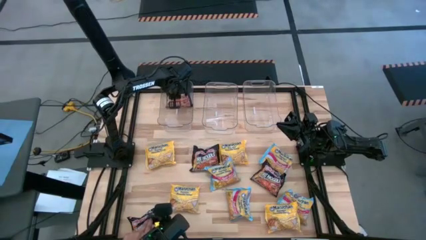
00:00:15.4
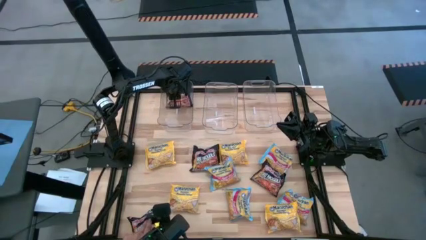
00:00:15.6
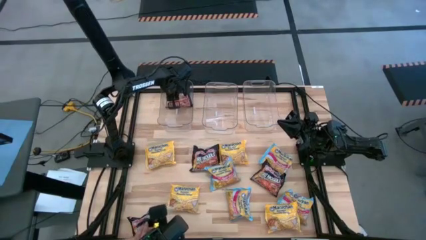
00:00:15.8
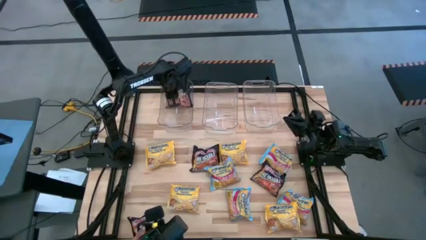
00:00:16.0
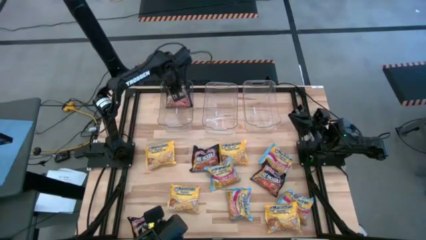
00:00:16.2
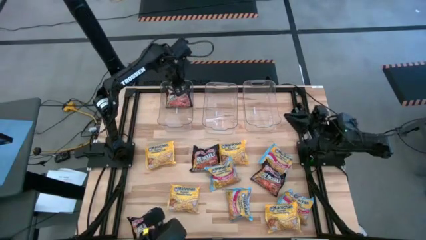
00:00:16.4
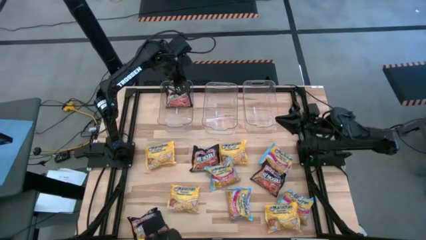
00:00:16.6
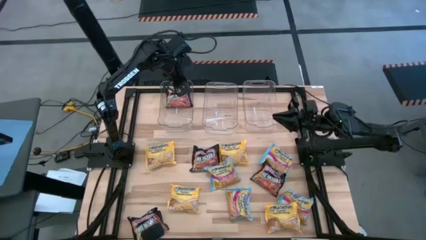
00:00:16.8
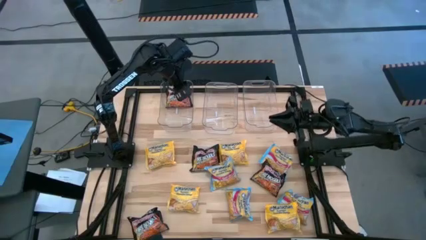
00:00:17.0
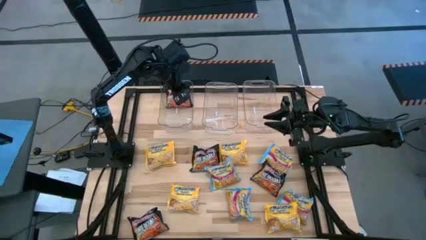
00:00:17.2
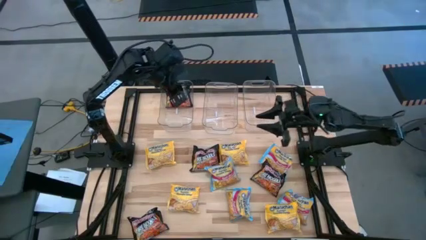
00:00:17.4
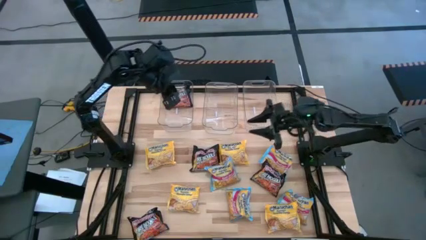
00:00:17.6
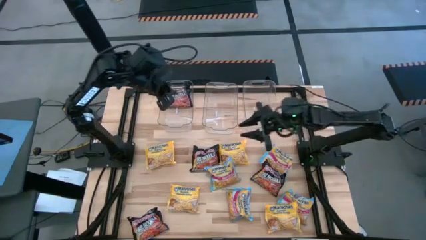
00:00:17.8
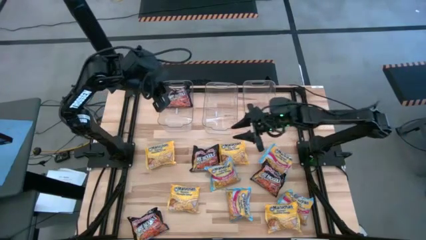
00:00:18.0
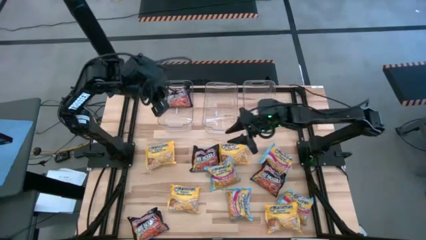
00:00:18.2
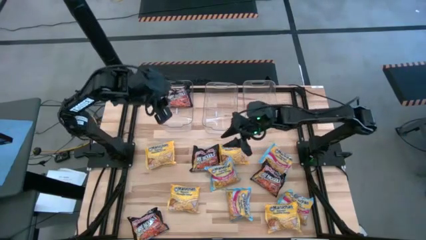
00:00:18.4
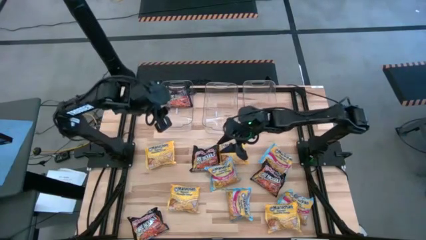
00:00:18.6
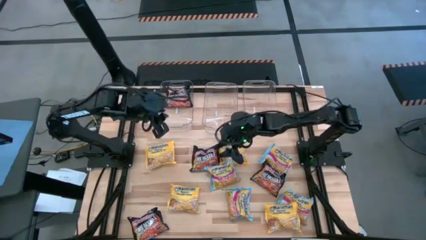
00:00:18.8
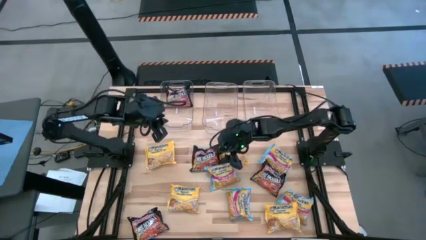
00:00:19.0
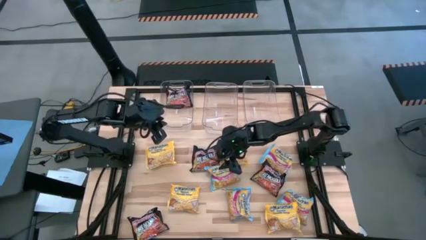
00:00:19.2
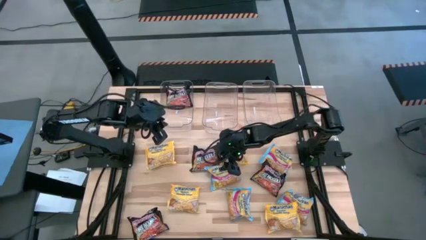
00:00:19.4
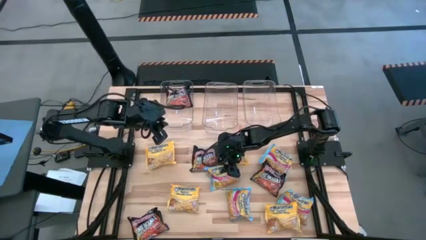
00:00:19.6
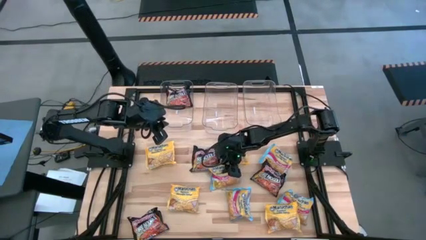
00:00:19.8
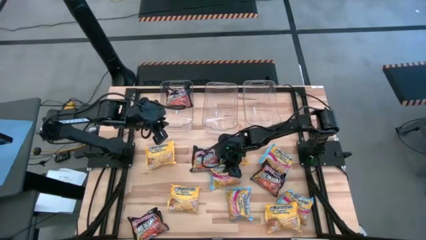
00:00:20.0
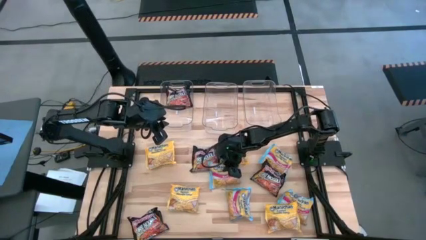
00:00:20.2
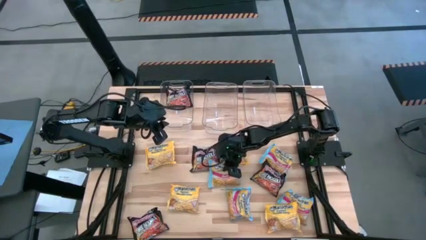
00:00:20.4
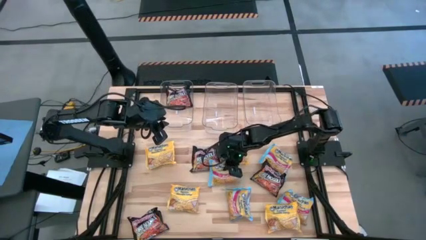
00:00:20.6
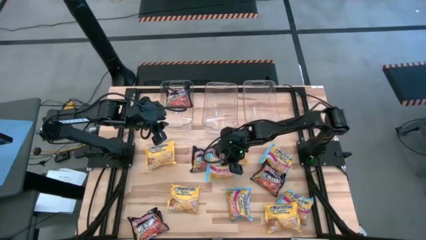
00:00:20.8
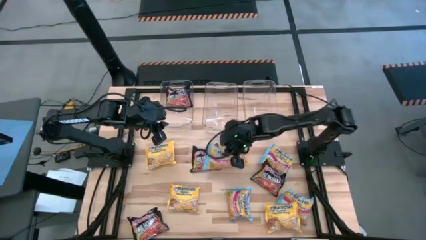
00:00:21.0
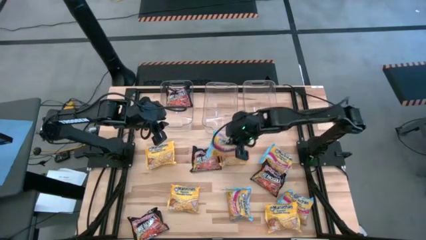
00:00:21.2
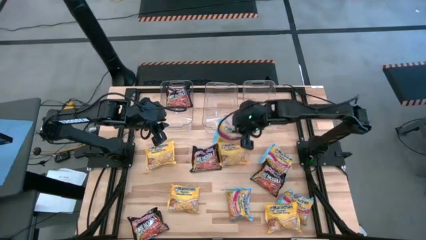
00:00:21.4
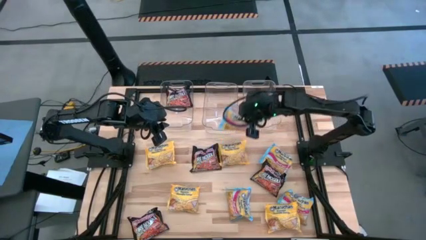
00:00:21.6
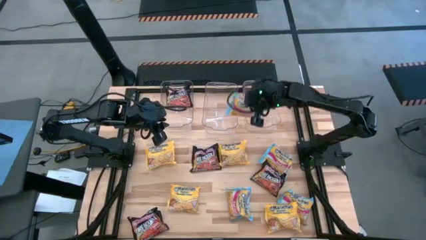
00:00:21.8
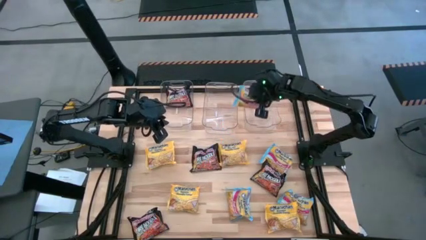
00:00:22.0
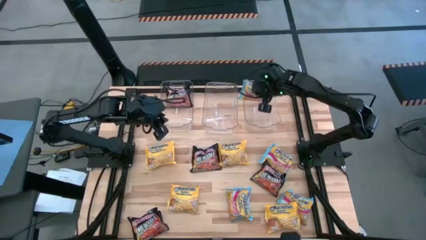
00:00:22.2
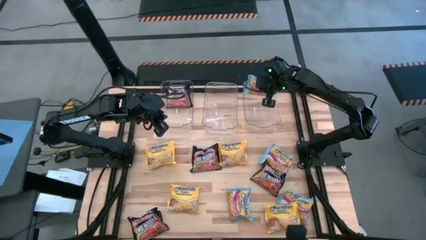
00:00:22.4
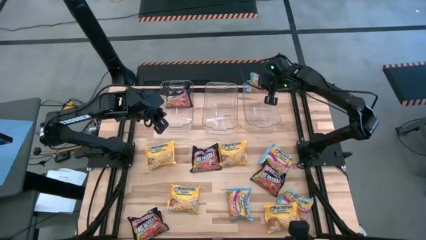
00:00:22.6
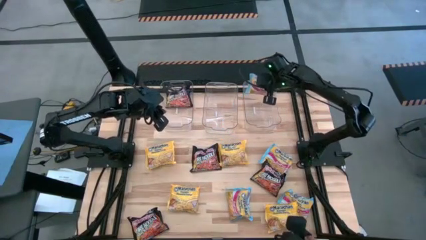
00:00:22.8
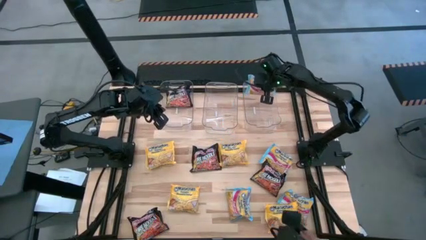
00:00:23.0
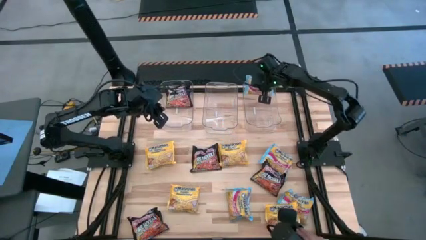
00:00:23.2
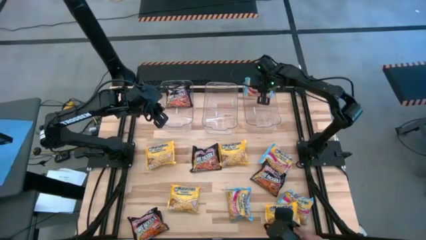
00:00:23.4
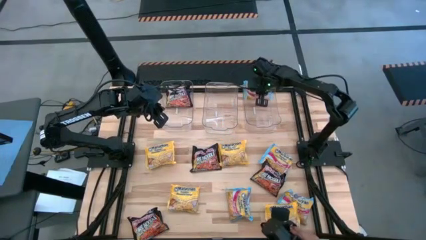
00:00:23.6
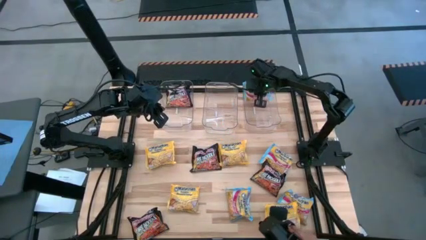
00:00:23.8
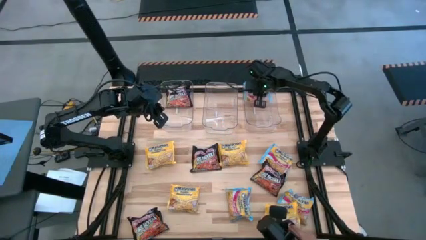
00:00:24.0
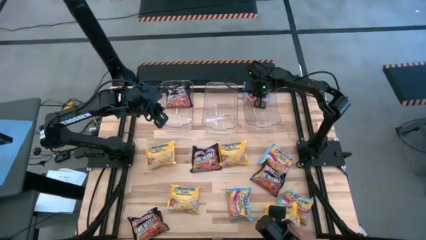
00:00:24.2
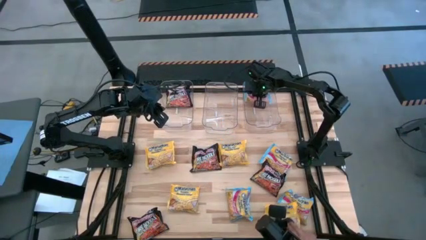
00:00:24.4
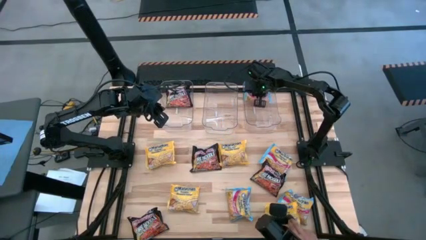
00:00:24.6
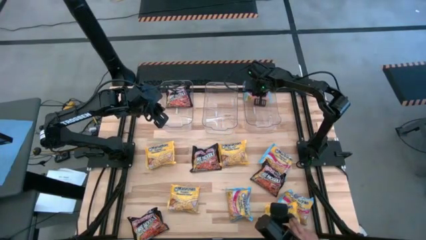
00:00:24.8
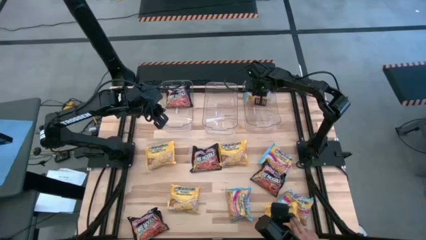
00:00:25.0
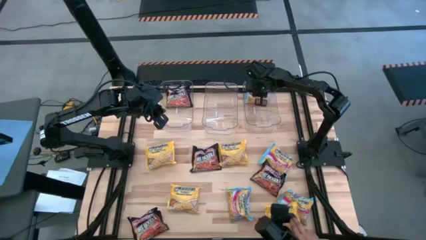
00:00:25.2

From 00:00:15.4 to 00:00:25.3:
Task: Sort Maruchan noodles
Put the blue noodle pack into the right transparent bin

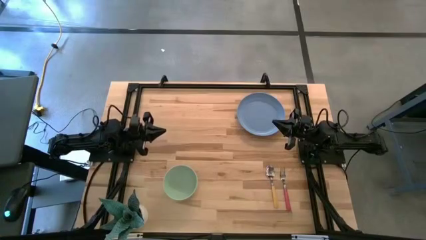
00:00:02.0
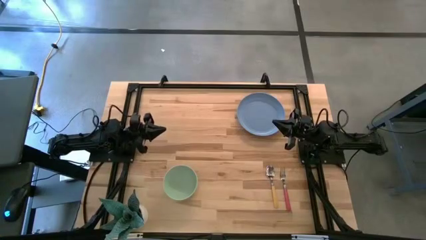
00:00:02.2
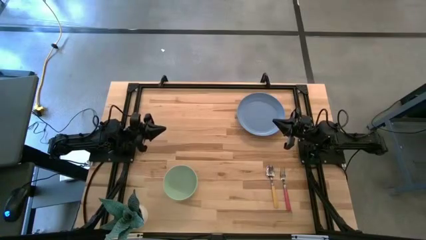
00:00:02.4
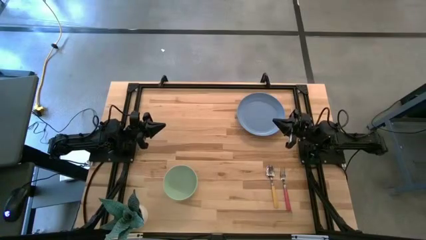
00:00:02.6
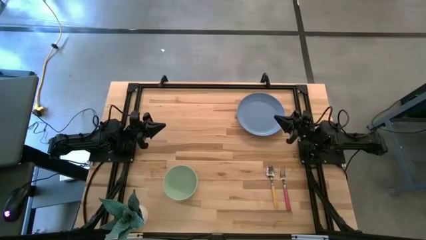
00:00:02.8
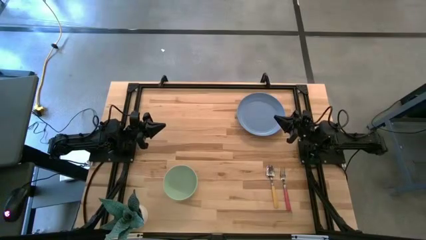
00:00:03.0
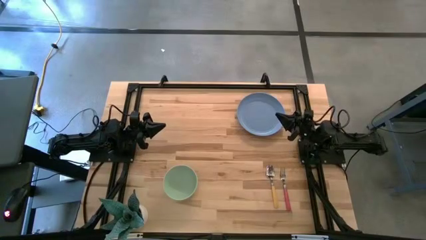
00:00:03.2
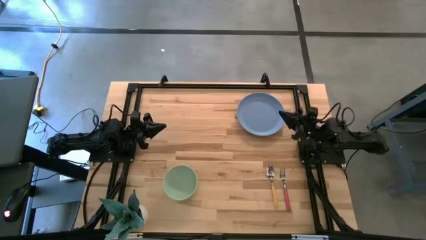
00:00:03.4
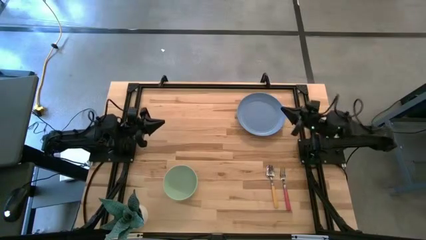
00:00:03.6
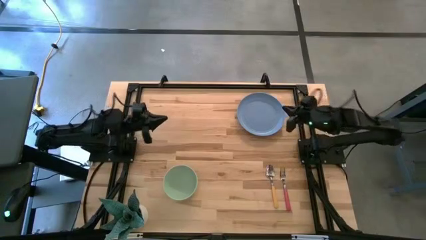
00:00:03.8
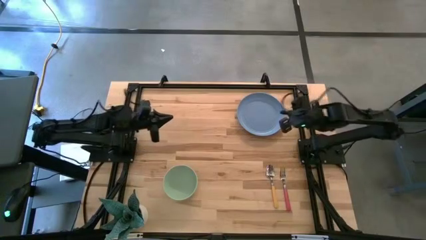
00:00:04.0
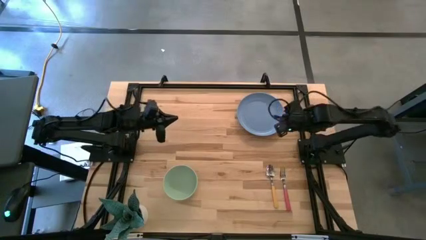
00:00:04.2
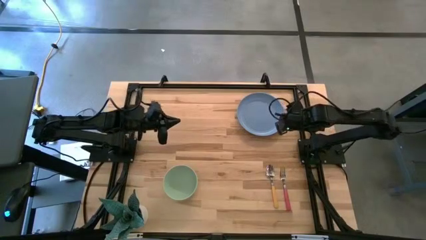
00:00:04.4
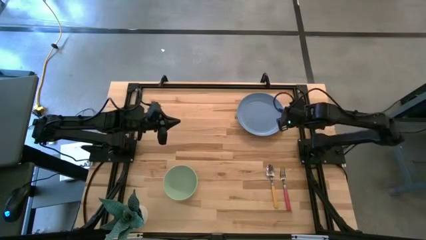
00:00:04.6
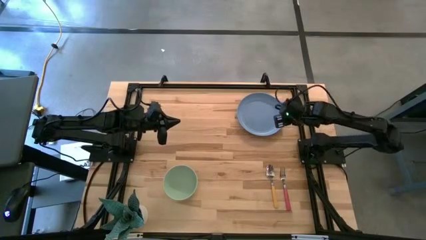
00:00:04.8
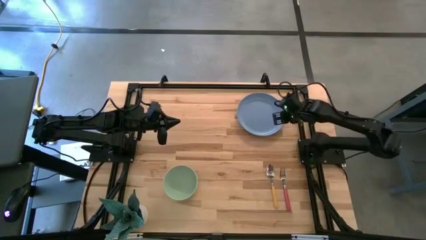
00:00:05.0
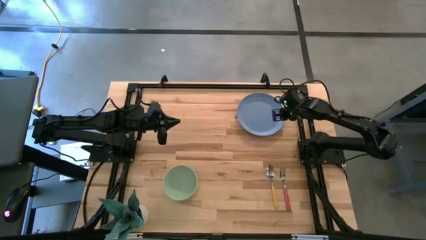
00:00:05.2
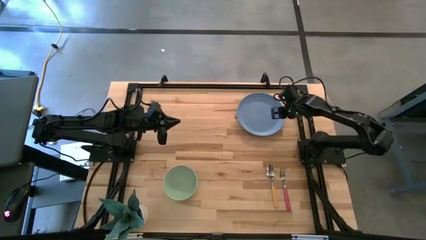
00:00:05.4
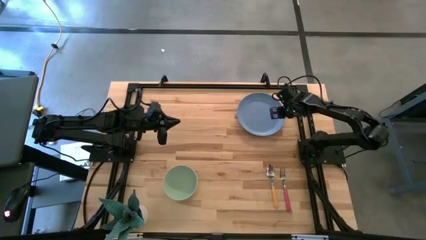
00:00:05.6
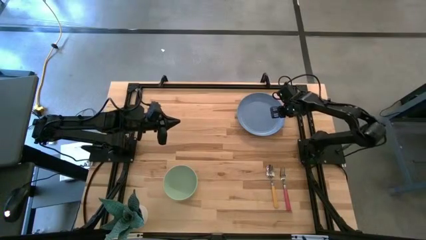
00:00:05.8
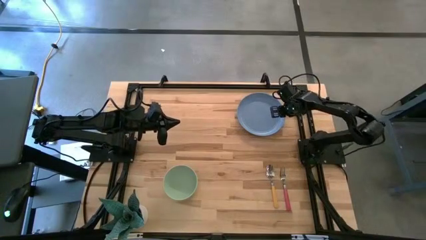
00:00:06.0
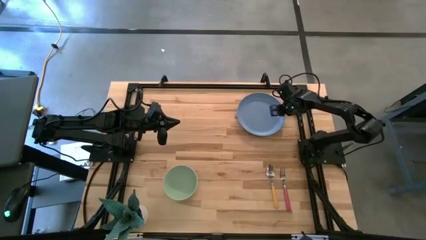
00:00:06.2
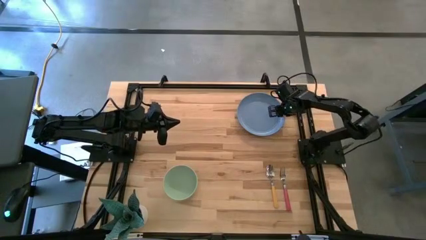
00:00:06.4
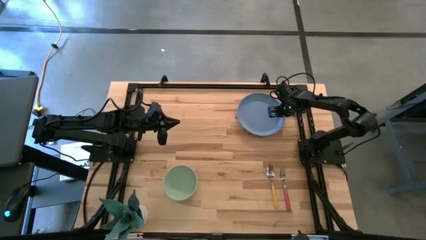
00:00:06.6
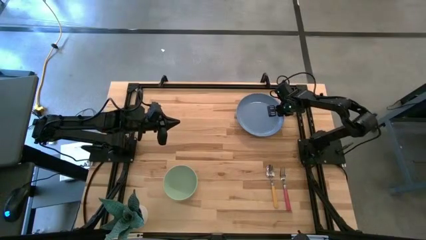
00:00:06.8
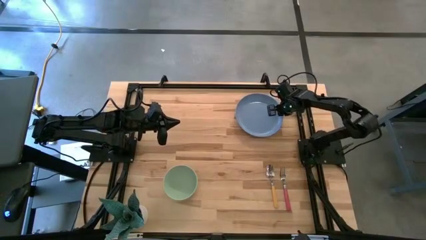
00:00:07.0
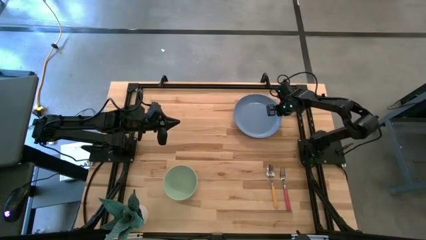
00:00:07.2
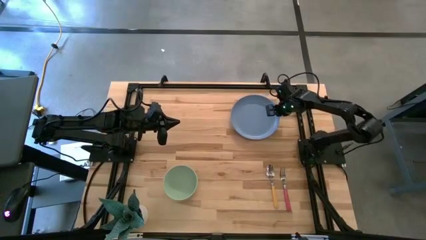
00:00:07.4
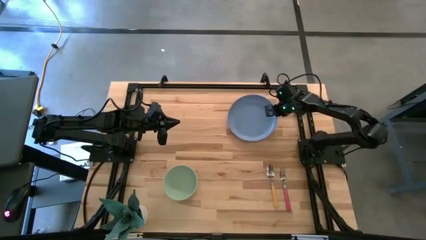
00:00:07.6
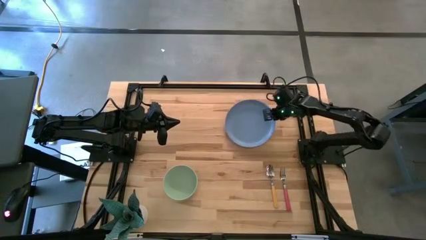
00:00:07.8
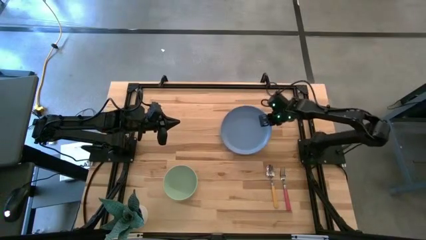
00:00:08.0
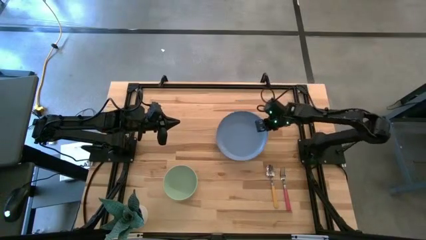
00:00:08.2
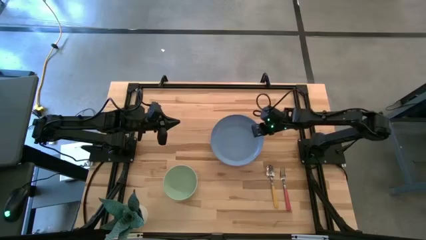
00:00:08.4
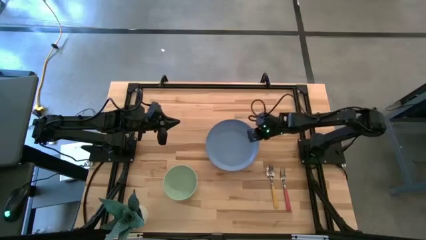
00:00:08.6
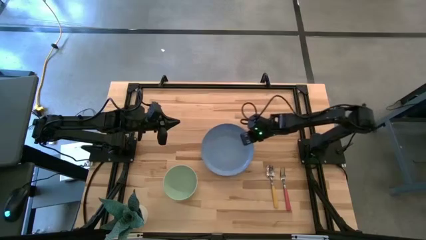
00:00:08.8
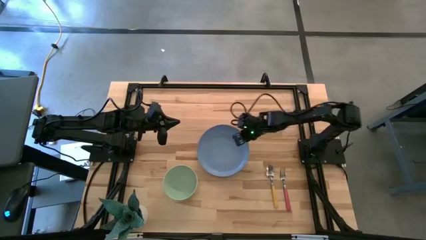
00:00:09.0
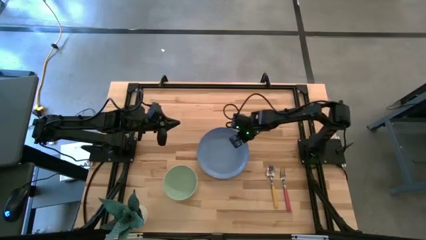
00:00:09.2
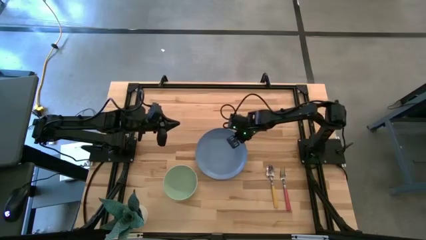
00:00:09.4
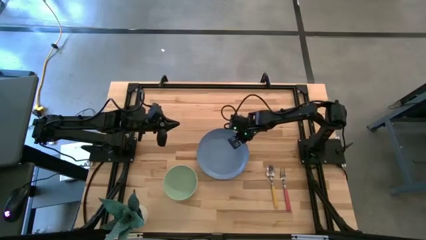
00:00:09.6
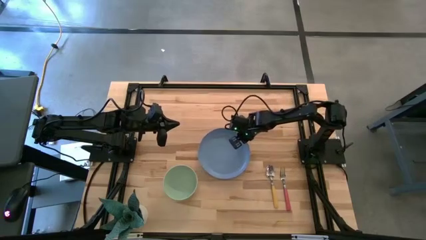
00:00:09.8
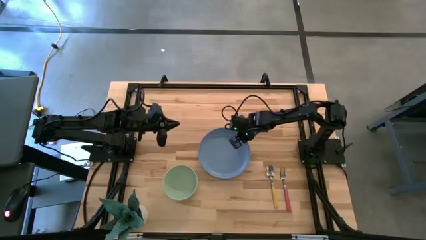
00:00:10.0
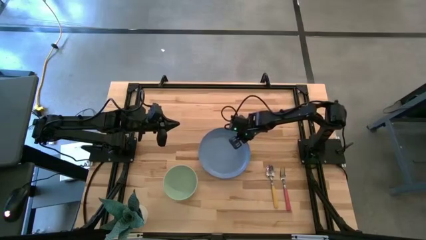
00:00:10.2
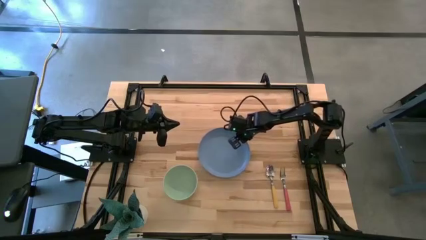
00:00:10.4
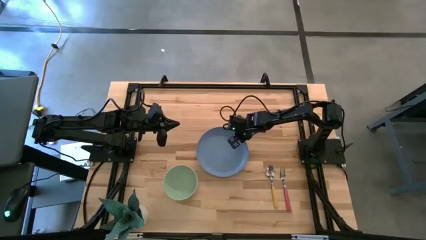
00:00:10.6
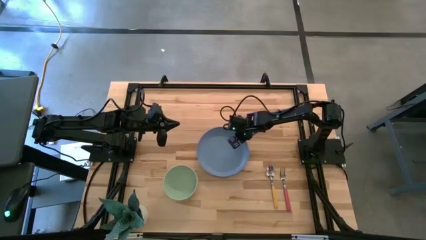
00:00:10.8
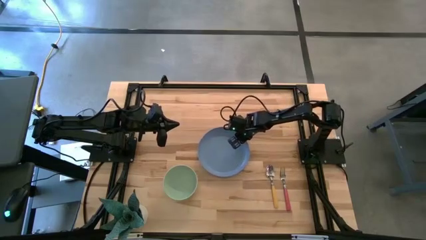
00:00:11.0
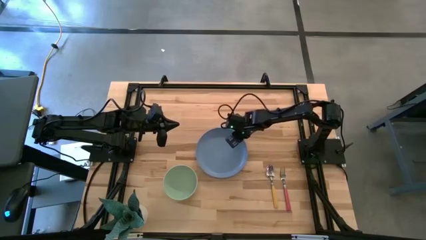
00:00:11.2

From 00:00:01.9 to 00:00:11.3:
Task: Set table place
Move the blue plate to the center of the table
